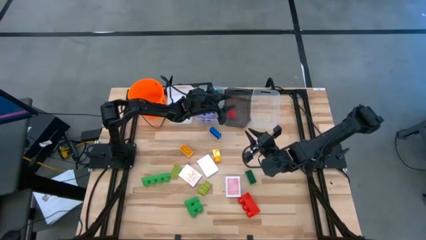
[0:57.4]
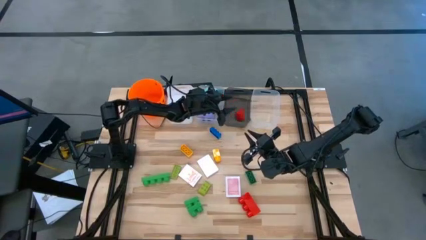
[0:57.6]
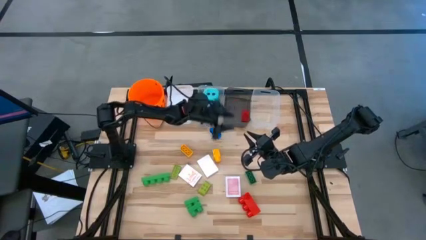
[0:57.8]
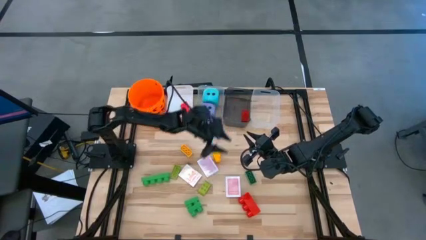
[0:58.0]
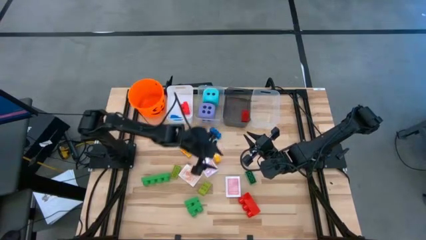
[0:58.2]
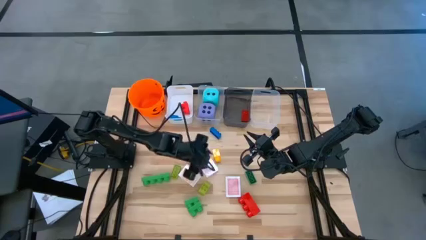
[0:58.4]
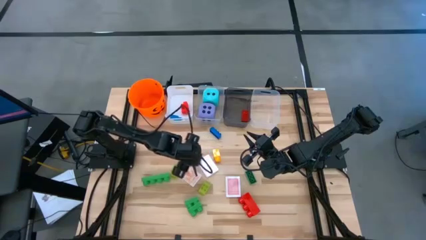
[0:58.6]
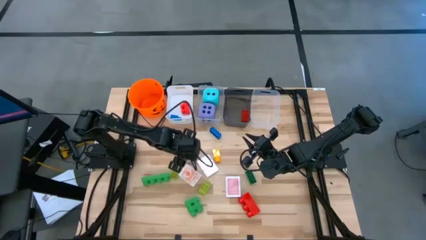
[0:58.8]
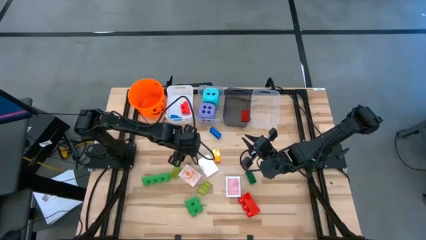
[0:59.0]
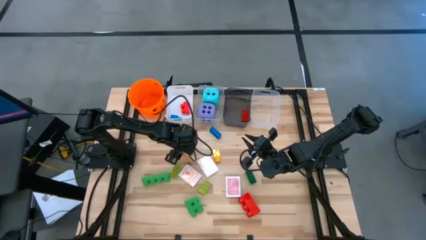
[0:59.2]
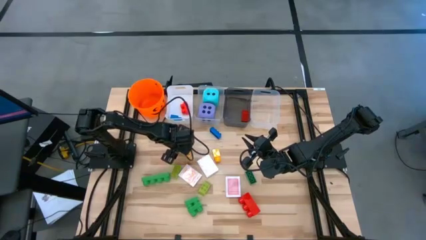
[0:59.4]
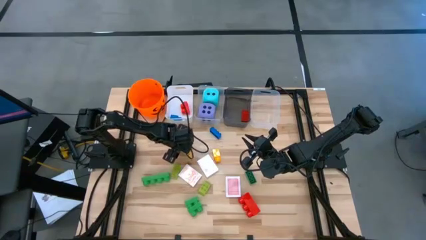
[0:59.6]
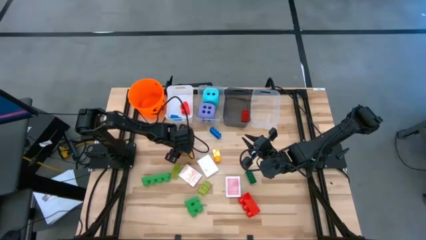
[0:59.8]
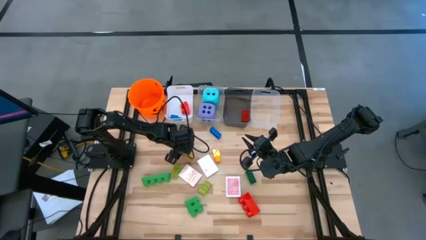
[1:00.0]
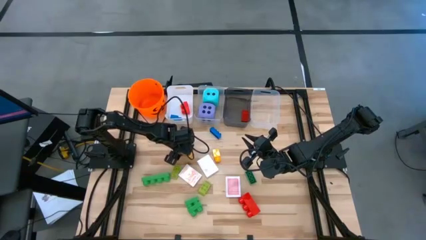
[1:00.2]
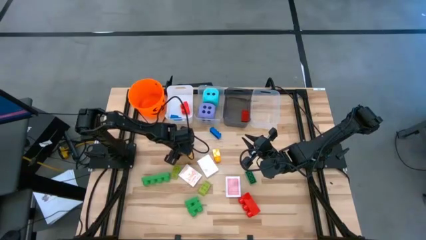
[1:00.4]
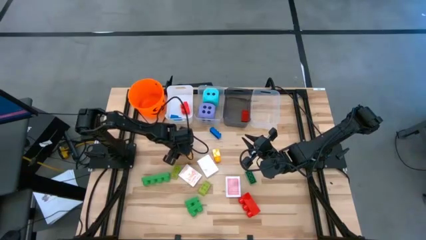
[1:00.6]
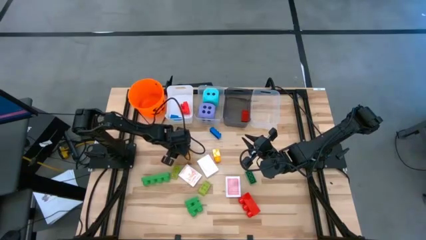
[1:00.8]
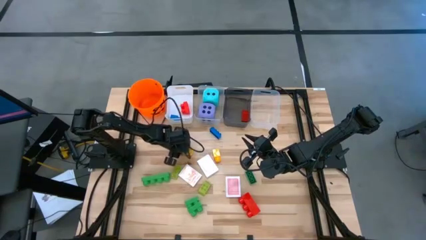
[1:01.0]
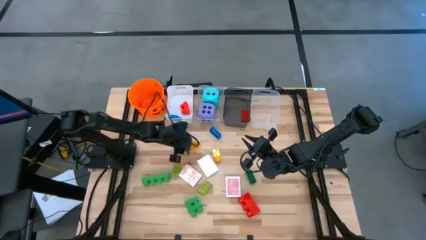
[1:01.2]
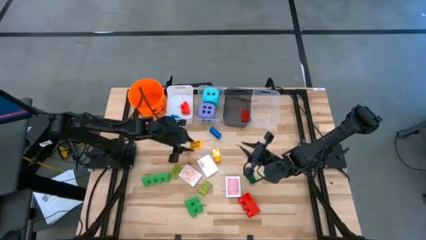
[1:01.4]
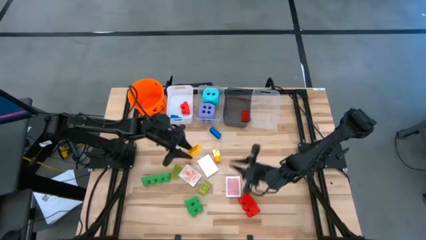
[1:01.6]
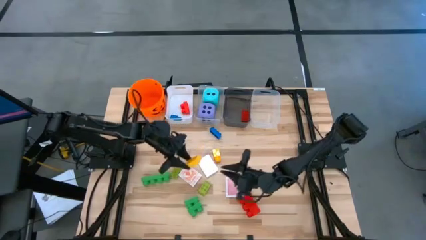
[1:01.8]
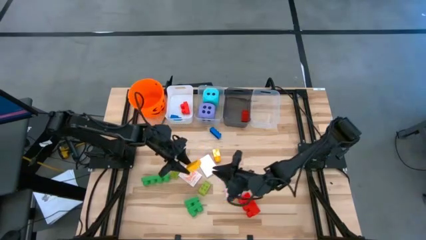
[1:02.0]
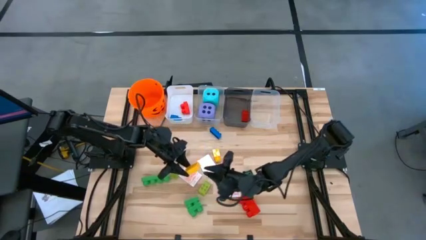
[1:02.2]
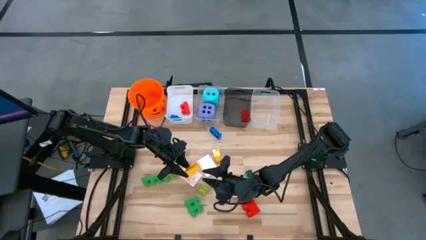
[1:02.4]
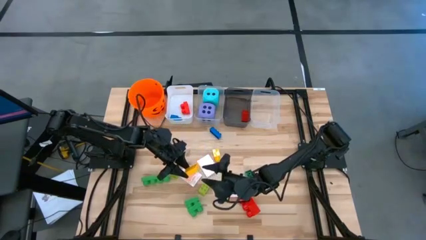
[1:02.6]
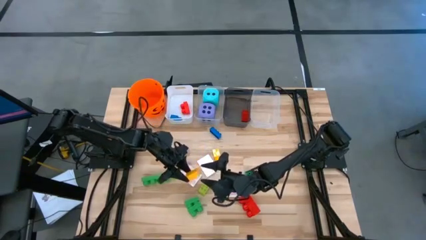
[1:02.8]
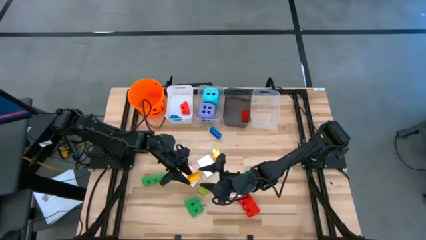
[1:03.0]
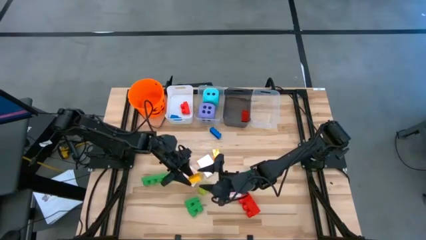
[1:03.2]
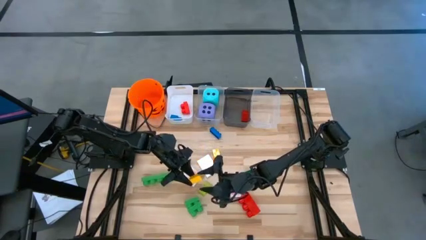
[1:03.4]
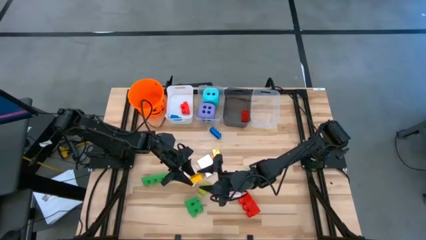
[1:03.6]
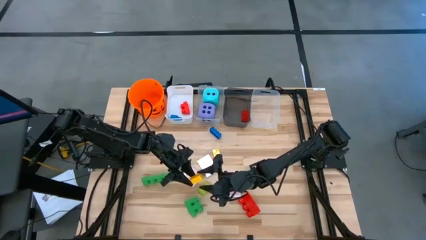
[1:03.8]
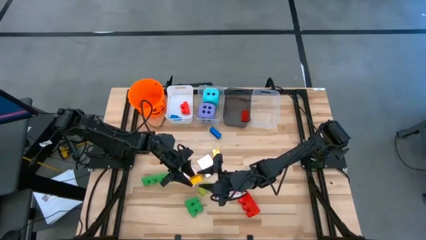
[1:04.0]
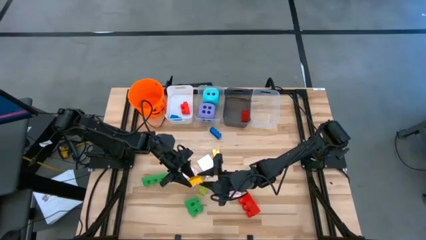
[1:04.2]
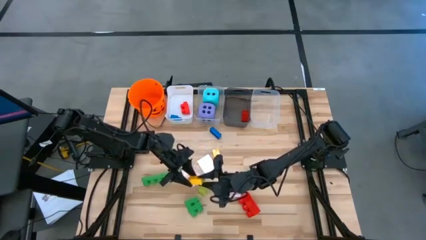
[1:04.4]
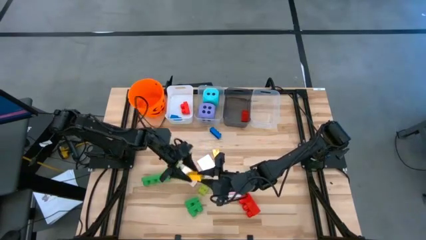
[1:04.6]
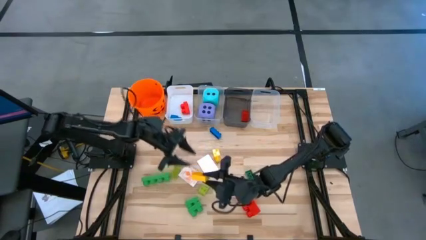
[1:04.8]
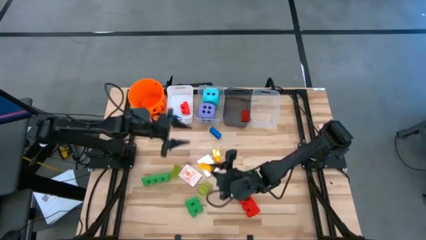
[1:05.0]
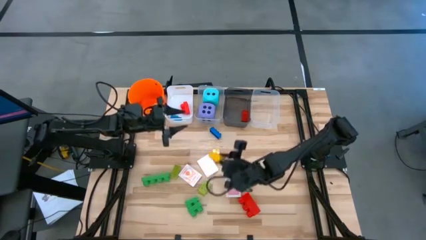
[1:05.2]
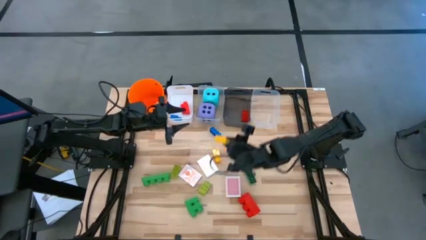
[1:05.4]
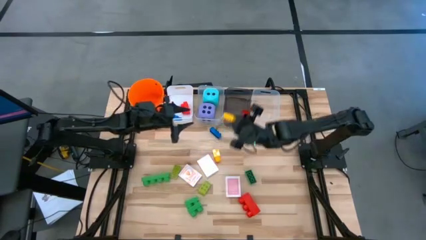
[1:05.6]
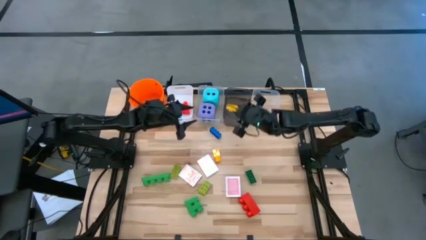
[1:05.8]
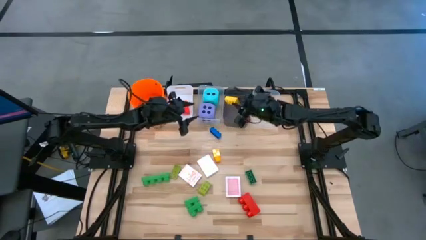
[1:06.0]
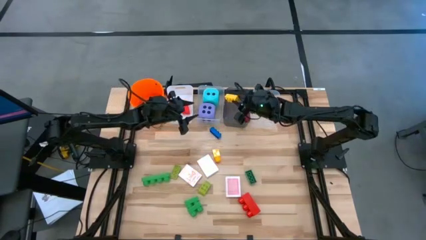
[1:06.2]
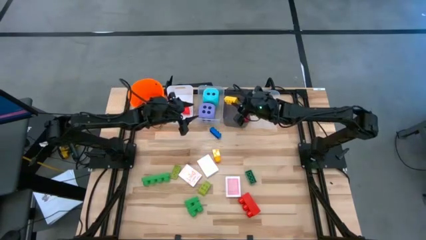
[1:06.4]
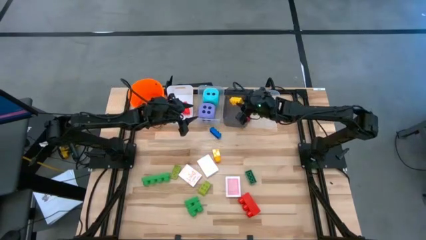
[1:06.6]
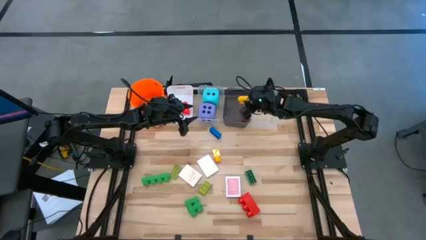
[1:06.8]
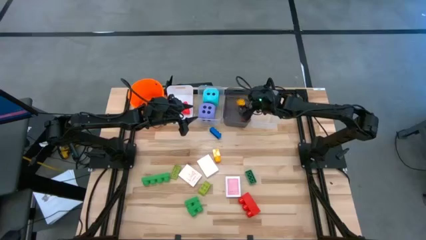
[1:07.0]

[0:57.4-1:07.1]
Task: Pick & Place Toys
Put the dark yellow game piece into the black bin

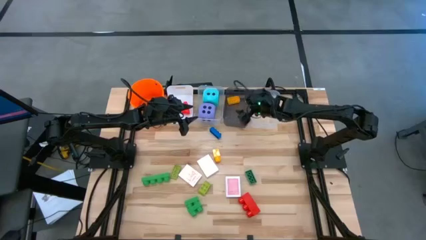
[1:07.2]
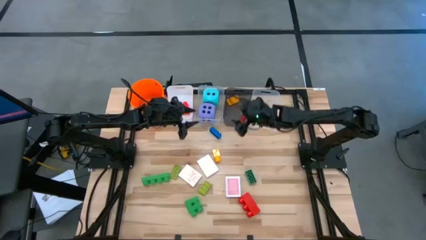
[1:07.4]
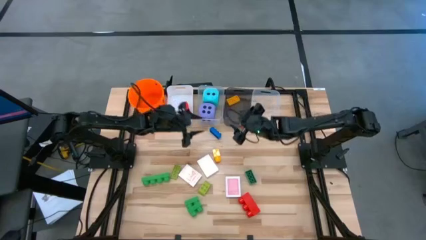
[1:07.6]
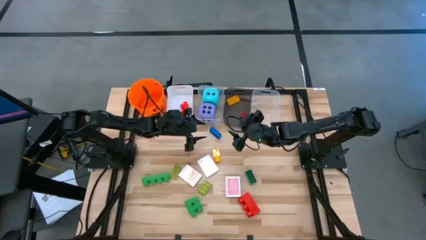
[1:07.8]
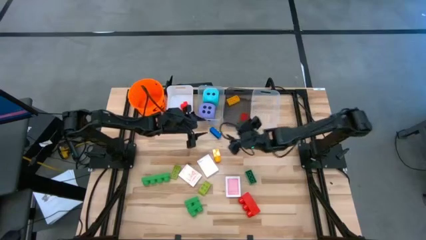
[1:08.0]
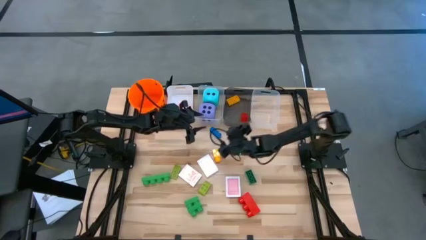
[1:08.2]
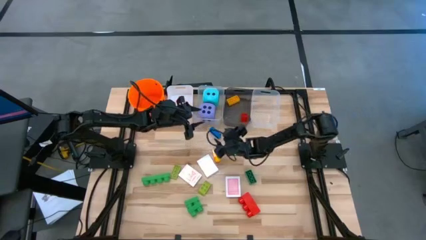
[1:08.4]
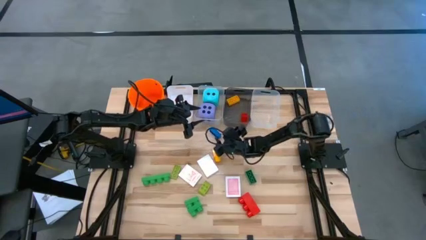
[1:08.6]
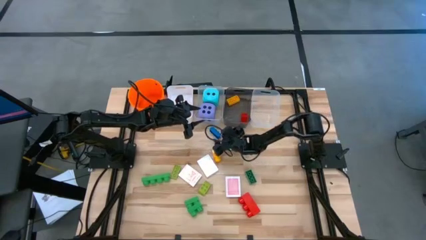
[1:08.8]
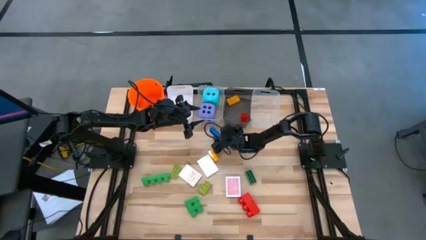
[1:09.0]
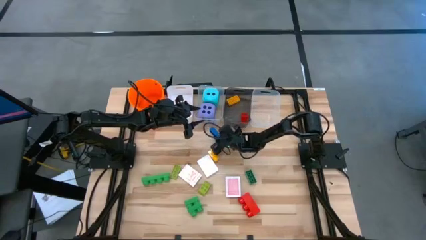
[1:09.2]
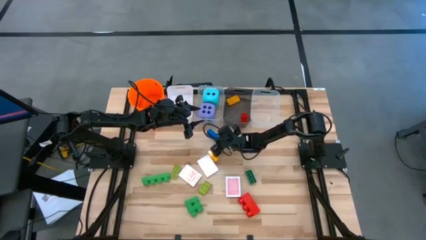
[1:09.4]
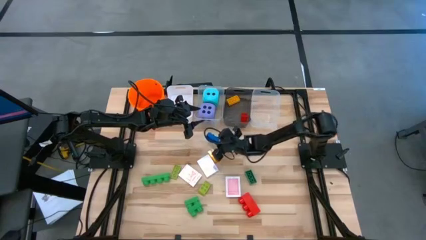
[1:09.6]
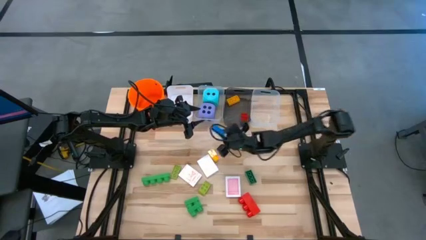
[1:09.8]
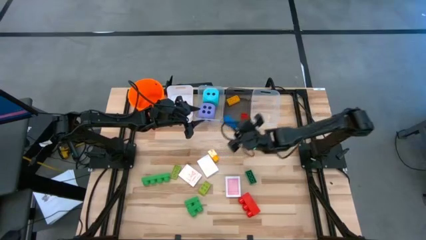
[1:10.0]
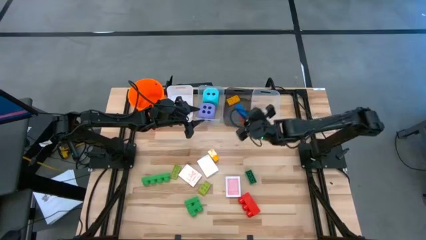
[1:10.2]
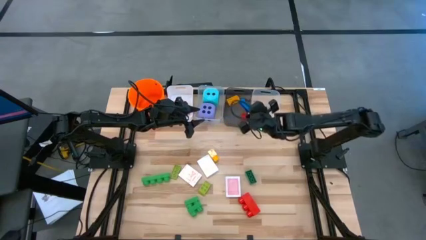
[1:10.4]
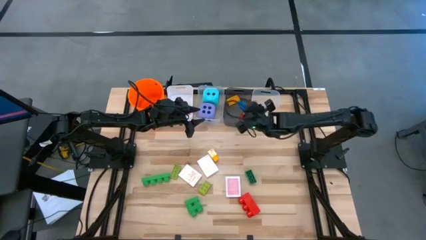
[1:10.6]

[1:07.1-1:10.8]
Put the blue game piece into the black bin

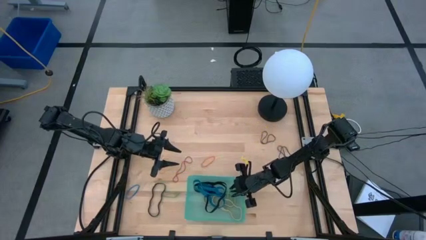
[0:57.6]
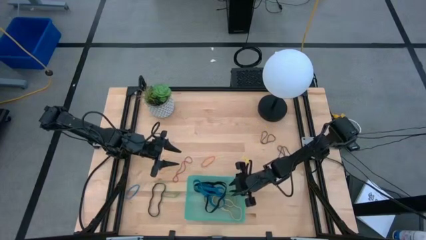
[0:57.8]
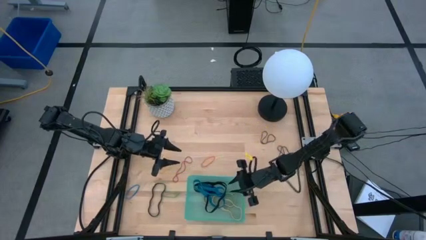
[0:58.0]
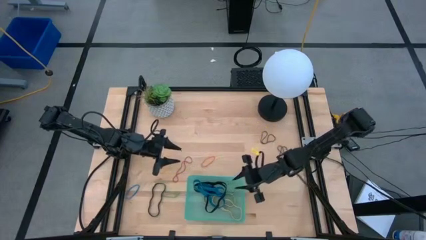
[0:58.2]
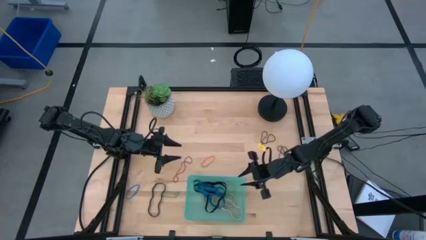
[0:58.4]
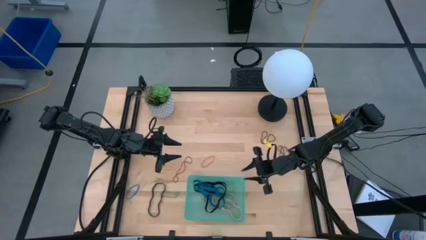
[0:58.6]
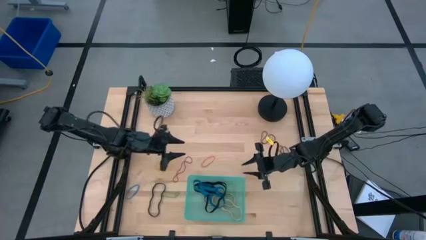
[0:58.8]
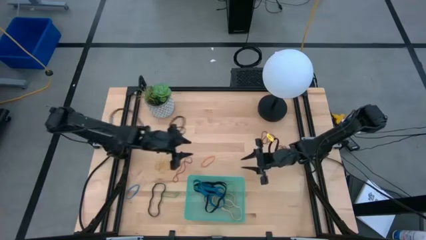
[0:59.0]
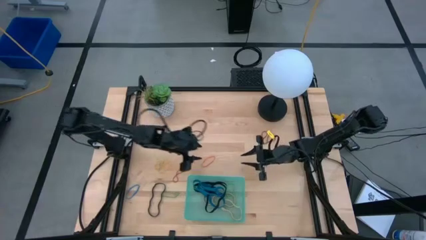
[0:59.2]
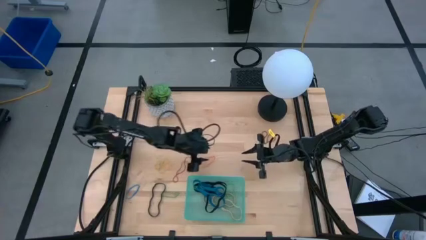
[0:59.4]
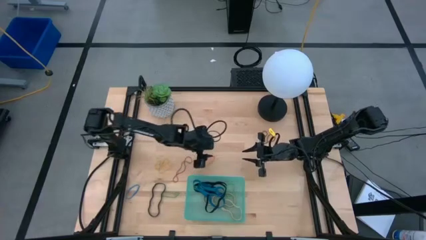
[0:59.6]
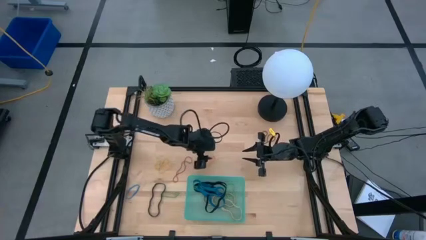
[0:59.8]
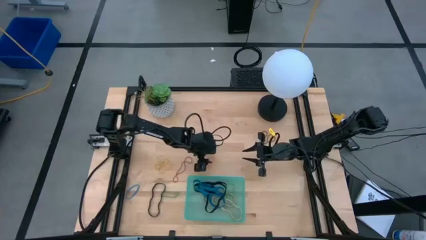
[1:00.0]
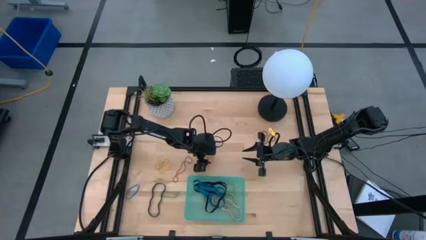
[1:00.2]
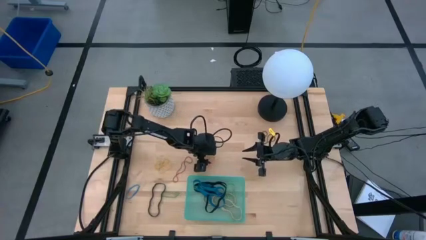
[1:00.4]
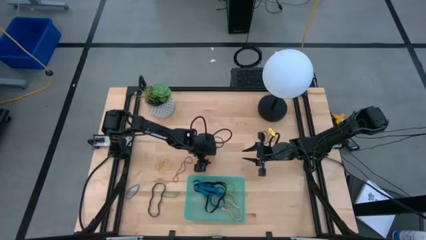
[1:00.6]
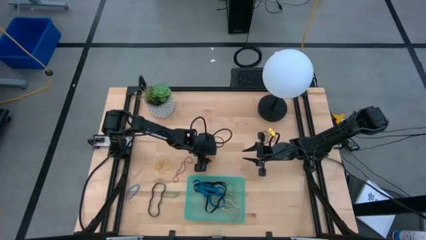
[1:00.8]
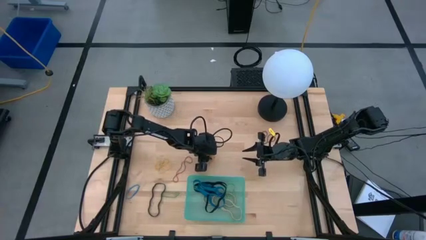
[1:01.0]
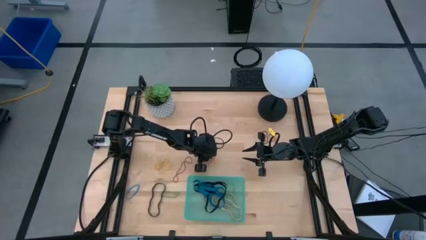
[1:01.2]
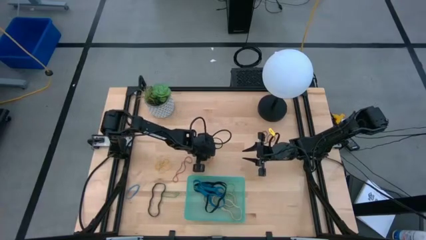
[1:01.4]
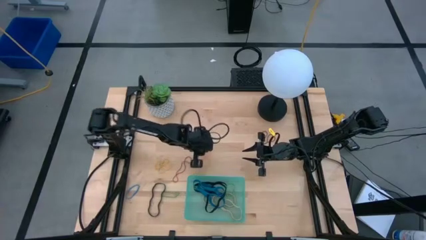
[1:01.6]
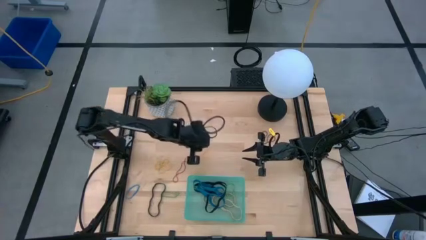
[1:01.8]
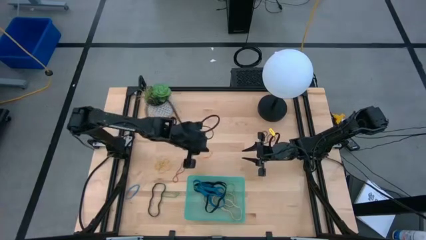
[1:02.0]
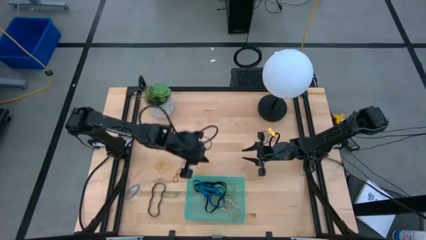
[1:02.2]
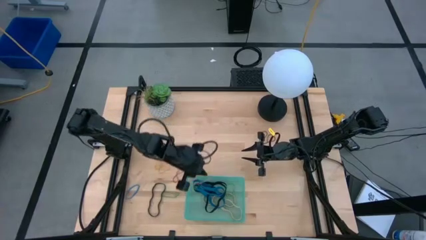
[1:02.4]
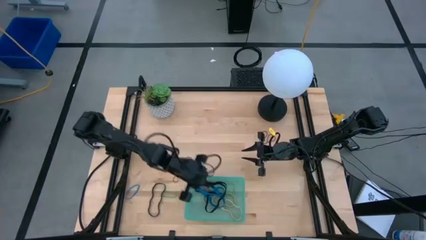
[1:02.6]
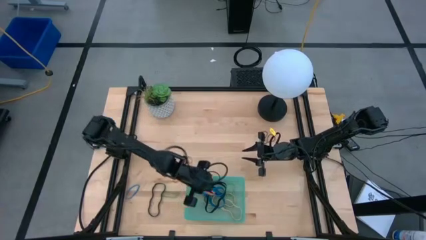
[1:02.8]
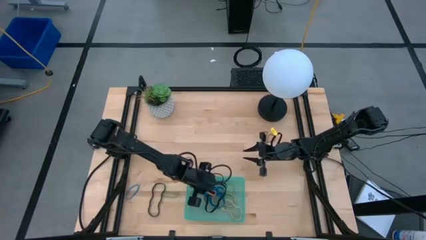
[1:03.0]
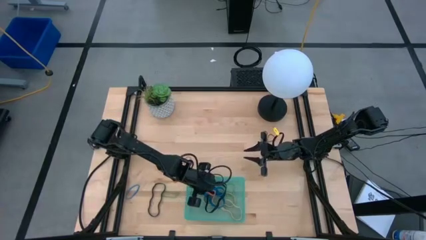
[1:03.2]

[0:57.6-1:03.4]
Task: Pick and place rubber bands into bin
Put the small orange rubberband into the green bin
